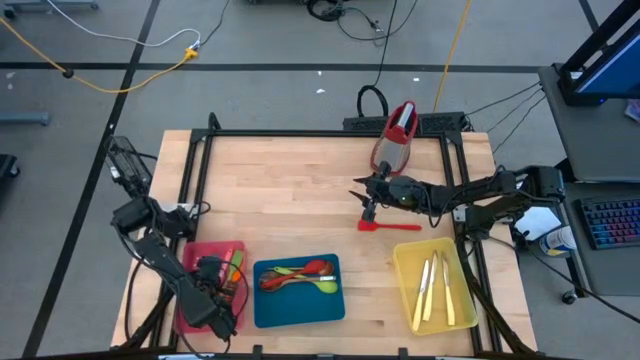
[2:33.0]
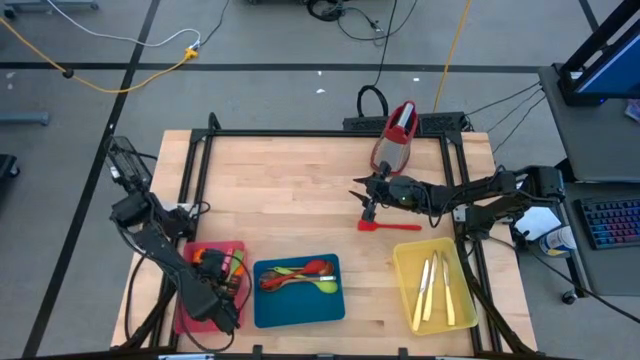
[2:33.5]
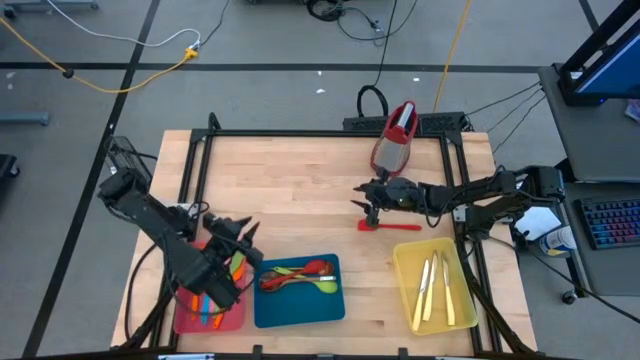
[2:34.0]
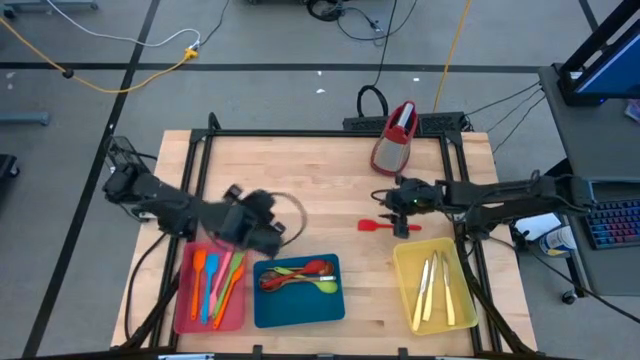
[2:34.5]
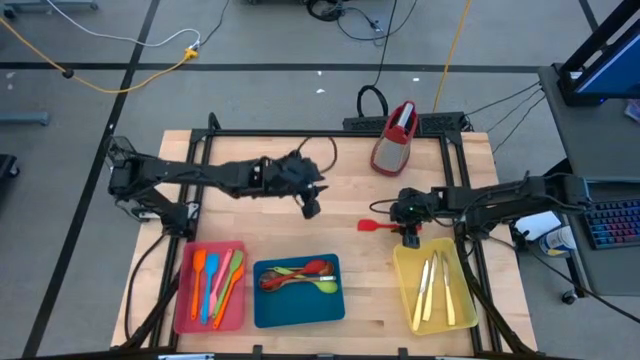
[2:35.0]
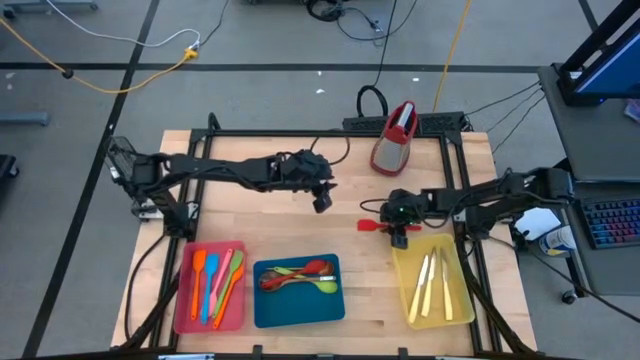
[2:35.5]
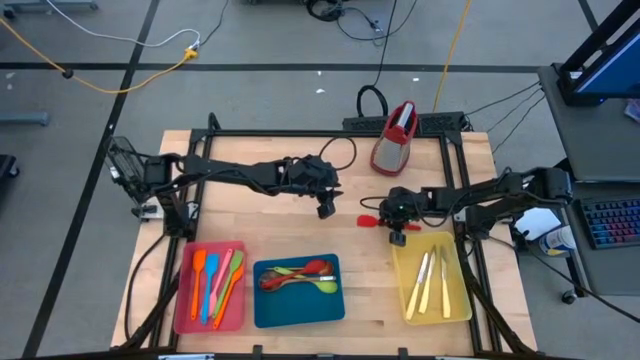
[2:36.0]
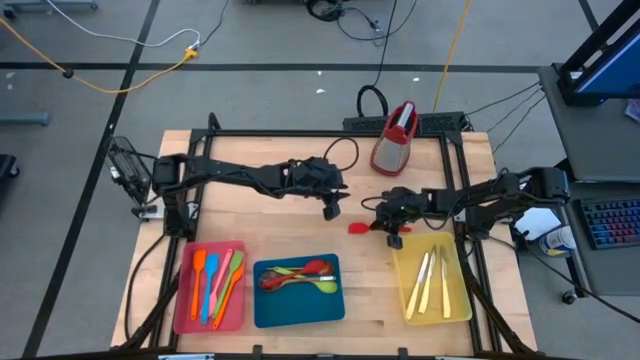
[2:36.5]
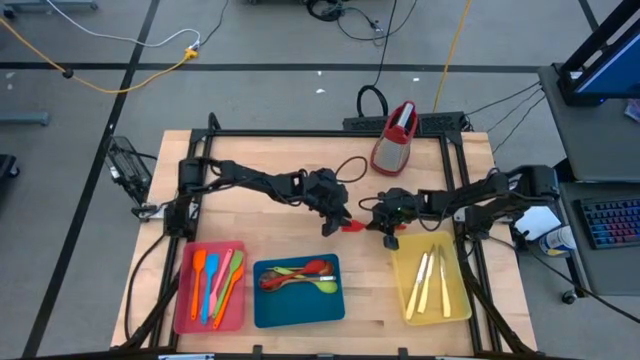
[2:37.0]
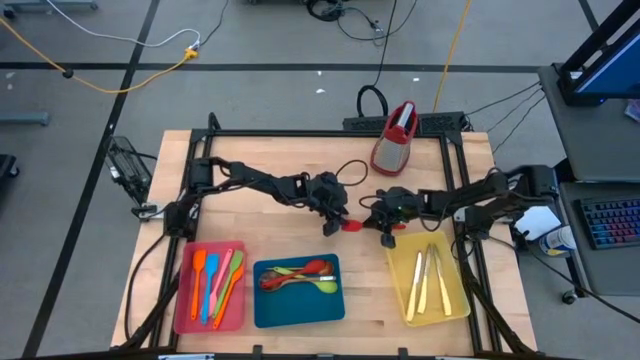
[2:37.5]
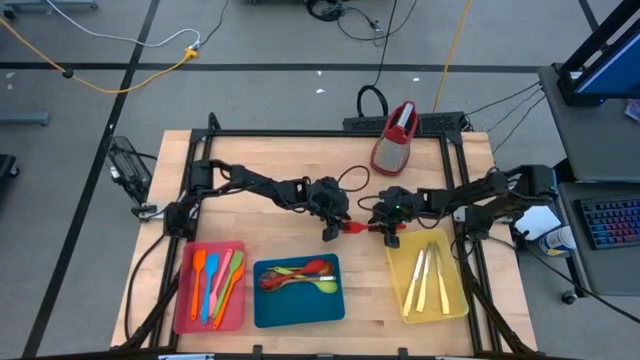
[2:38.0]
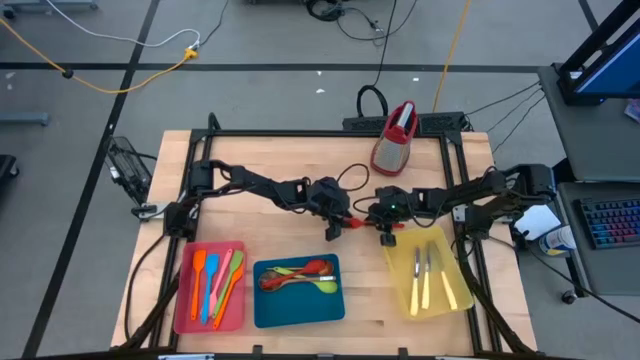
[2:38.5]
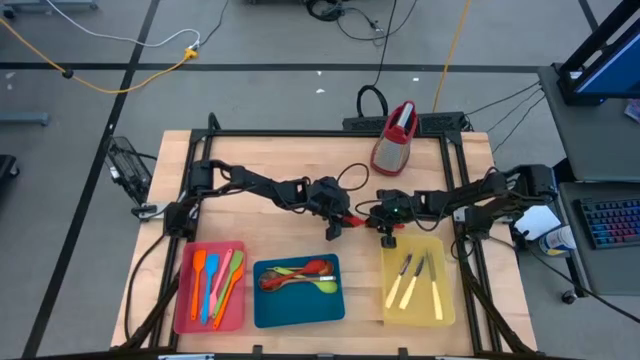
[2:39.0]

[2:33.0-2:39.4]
Task: Pick & Place Kitchen Items
Put the red spatula into the pink bin

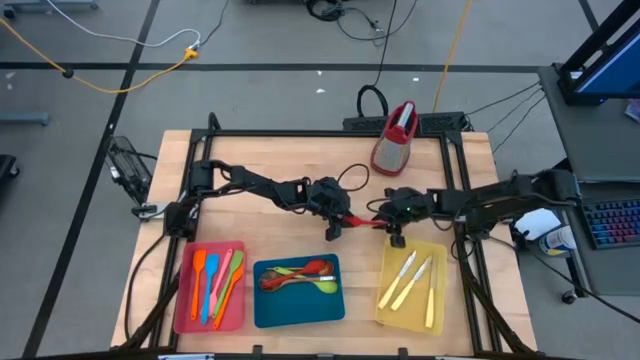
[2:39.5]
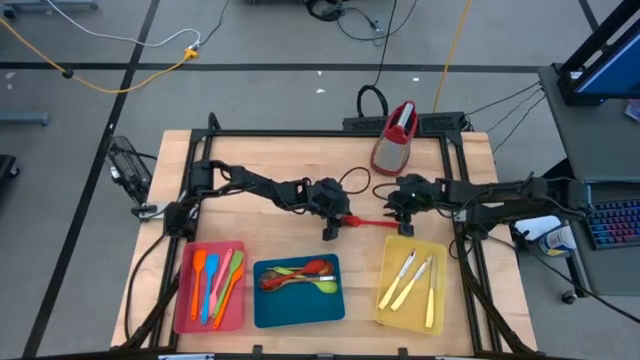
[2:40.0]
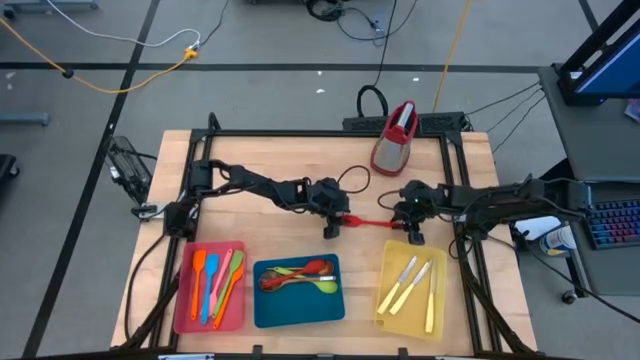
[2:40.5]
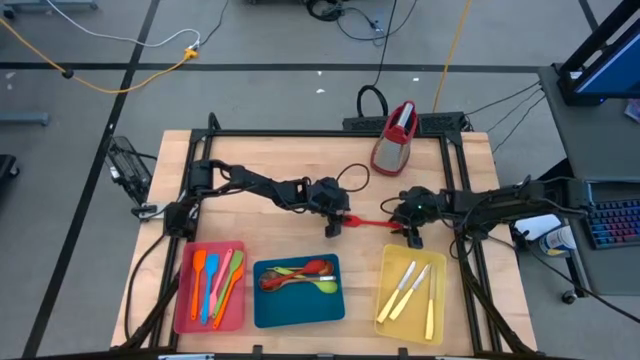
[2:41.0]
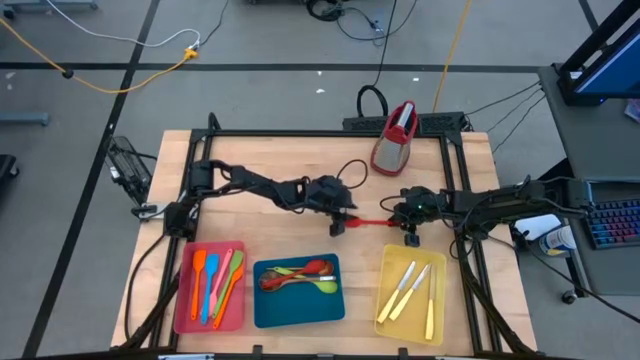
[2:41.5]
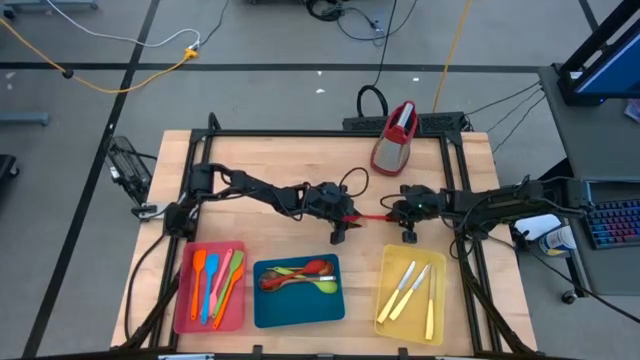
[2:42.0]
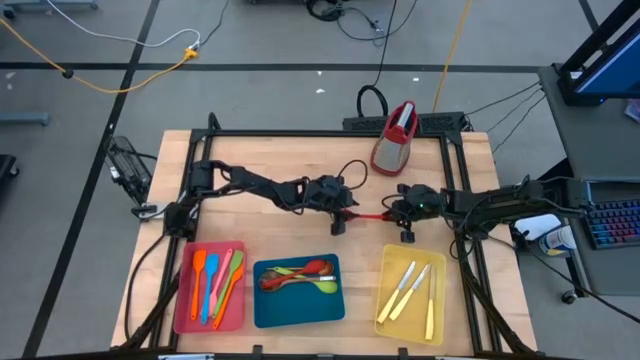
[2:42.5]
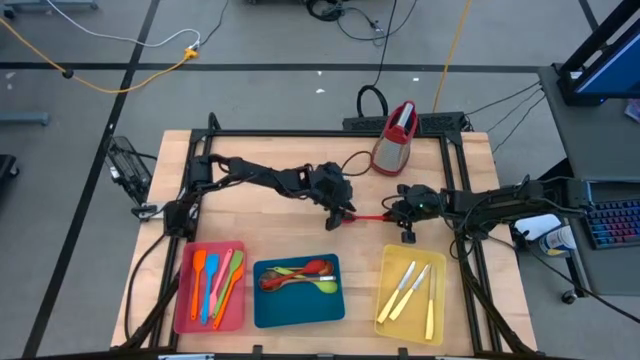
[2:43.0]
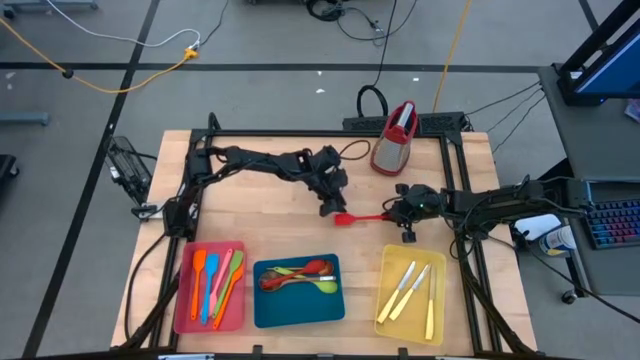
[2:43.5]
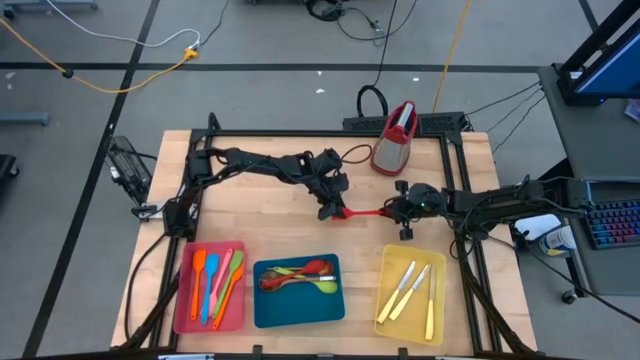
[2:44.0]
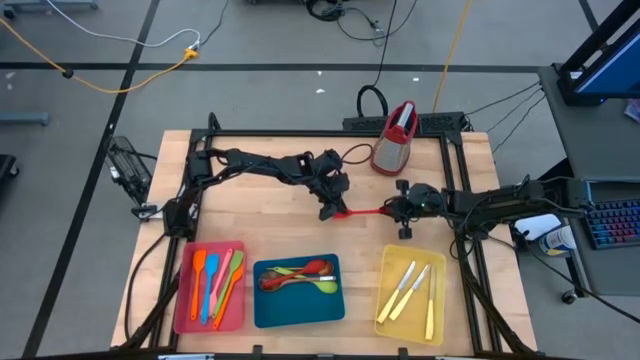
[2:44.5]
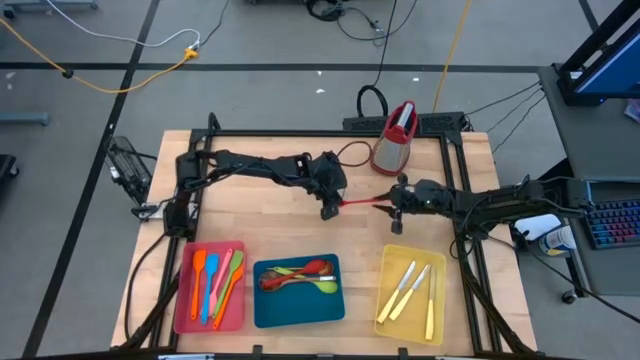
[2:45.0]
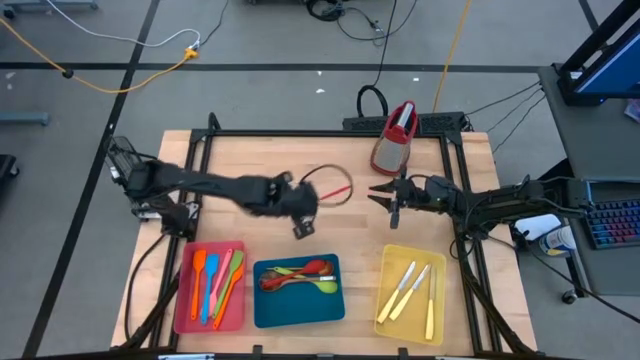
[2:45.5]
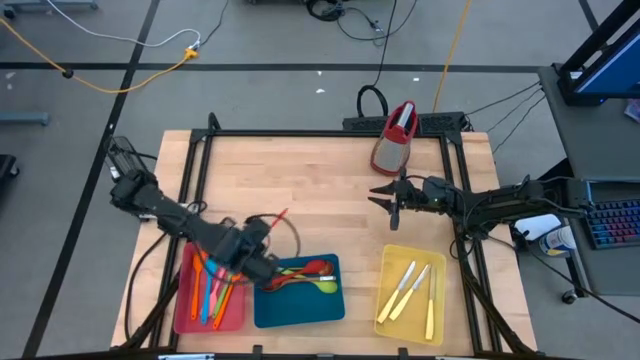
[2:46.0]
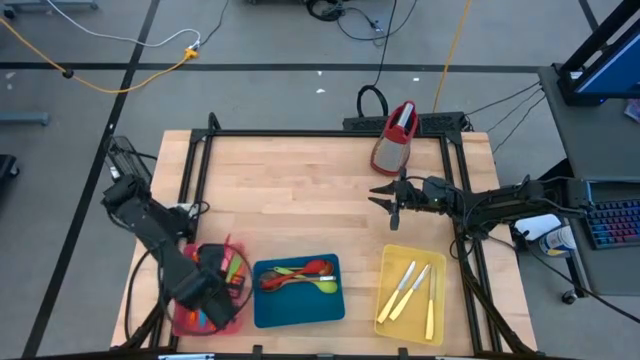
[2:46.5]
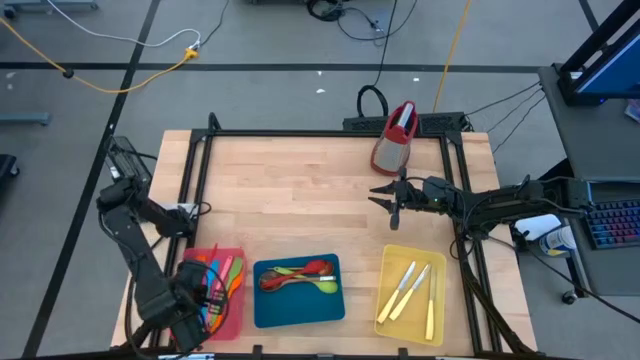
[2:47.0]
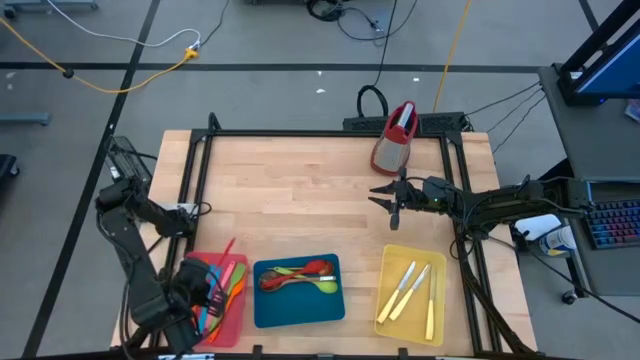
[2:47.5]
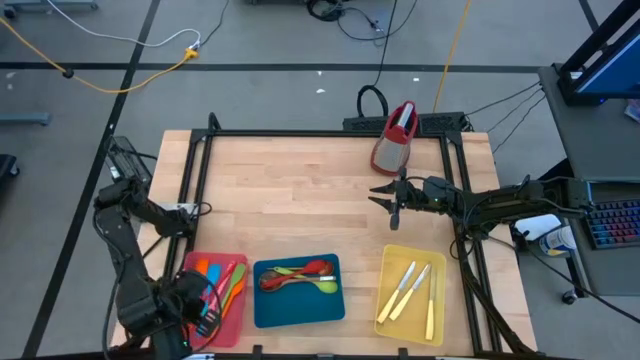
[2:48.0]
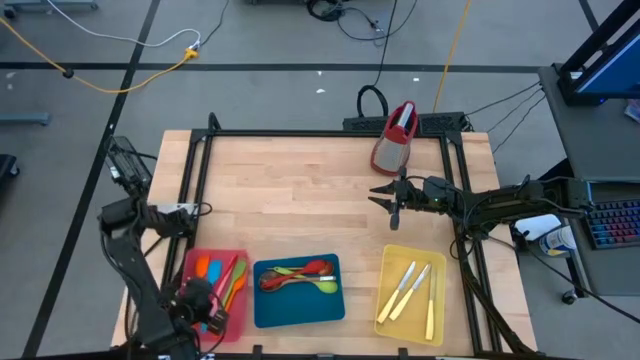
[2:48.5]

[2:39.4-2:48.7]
Put the red spatula into the pink bin

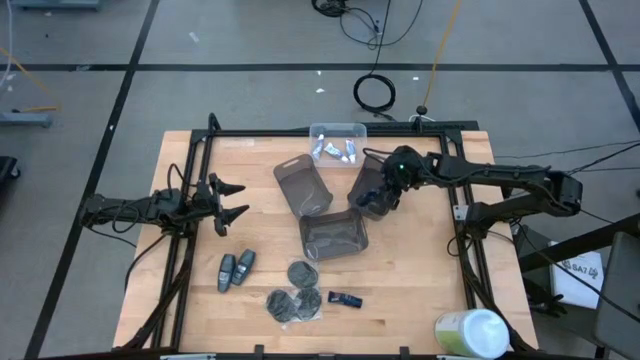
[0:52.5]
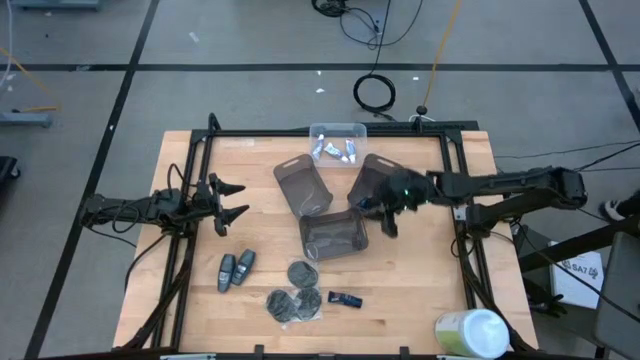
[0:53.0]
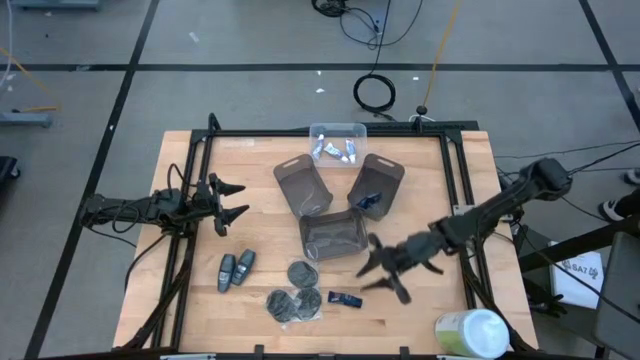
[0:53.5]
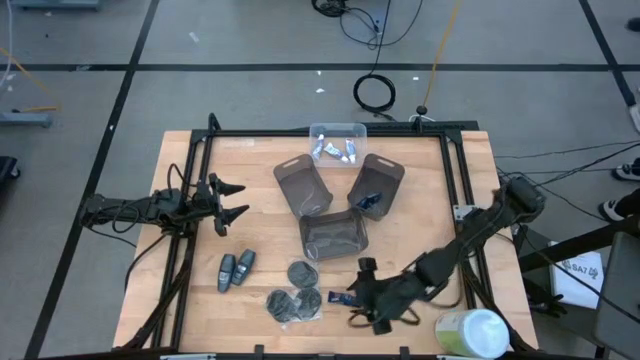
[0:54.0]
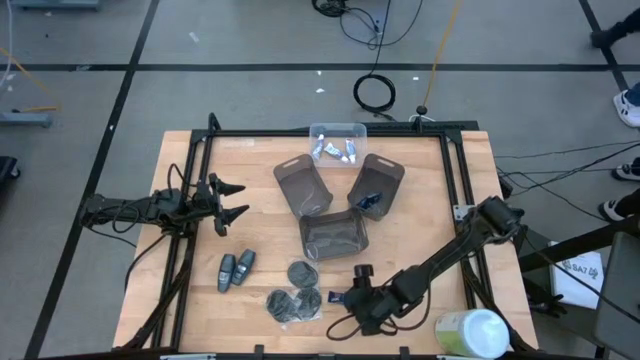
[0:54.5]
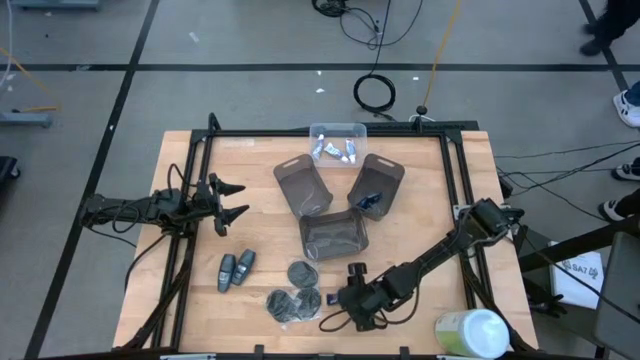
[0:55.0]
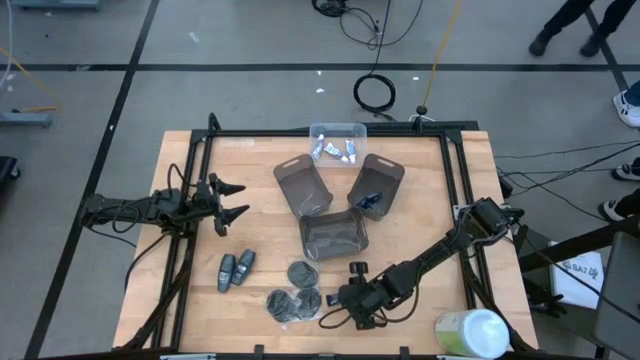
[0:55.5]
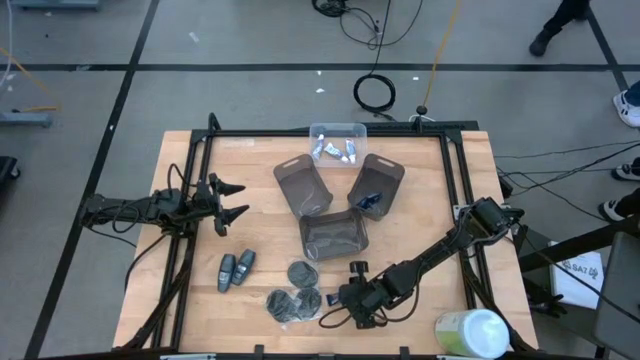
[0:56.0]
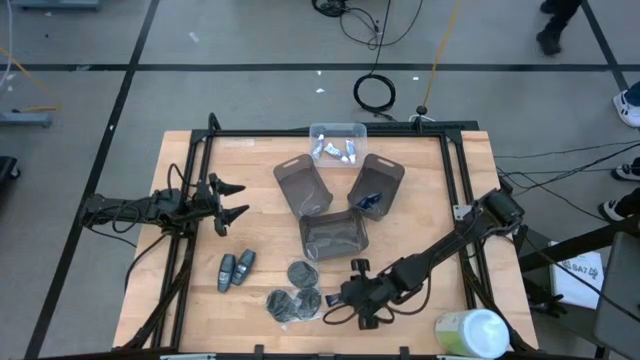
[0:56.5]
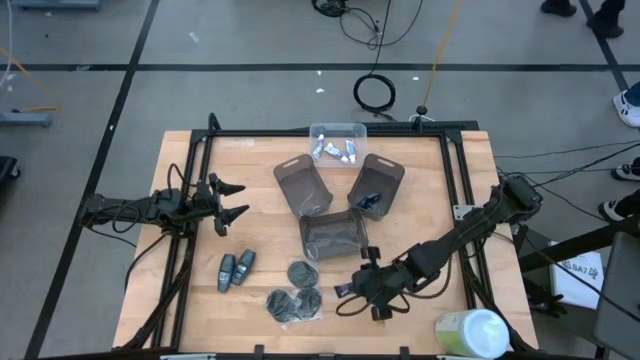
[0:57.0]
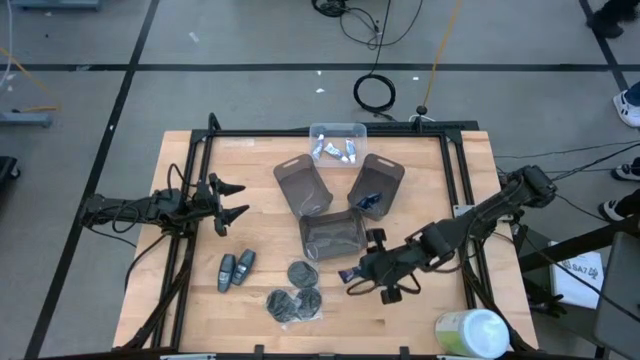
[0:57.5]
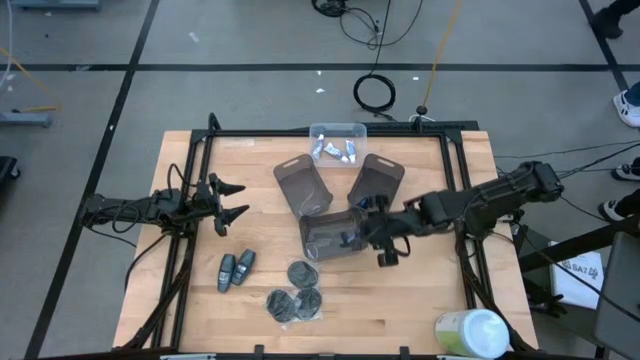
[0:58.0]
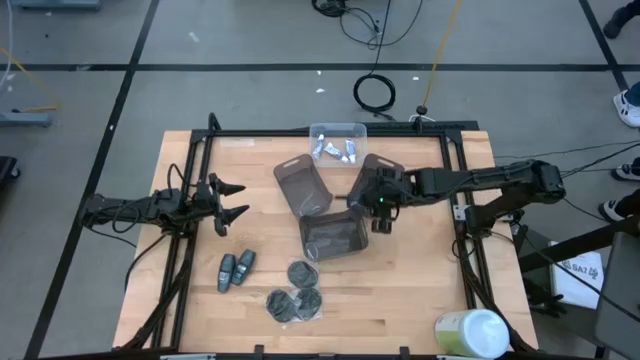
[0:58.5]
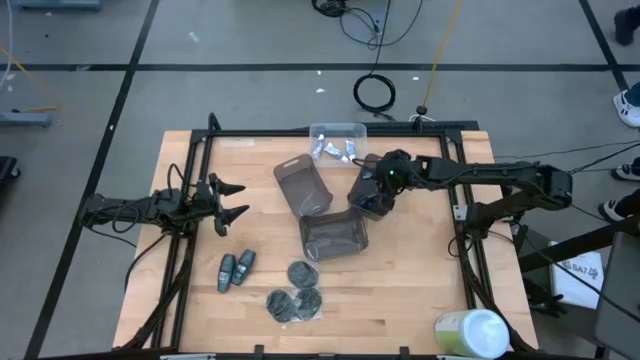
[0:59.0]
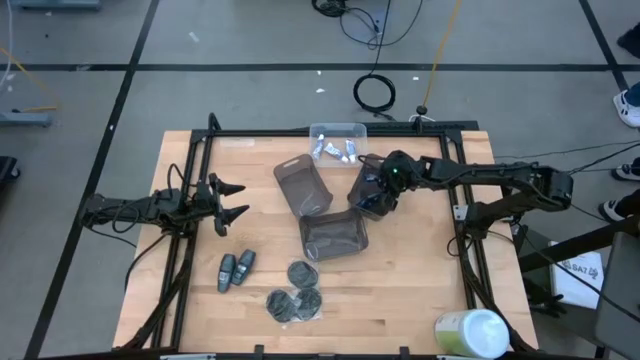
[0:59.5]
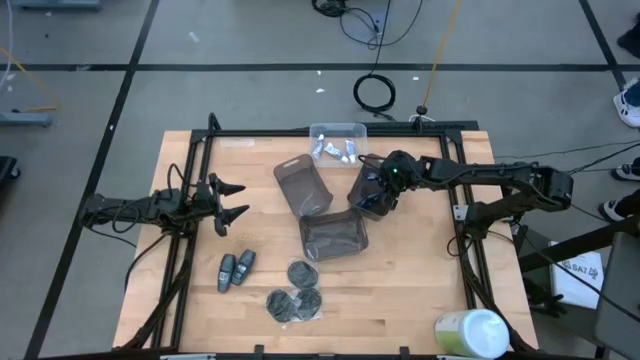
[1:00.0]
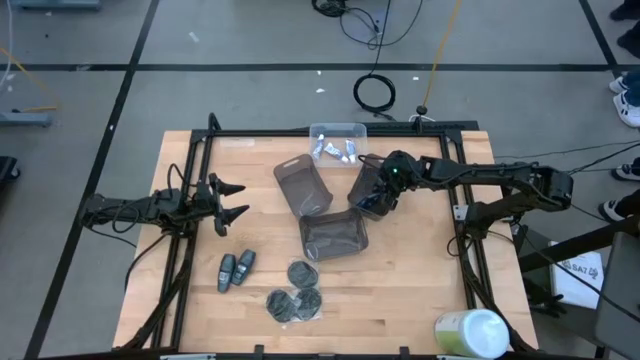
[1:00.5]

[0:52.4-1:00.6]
Task: Pick & Place Travel size toiletries
Put the black shave cream into the top right black transparent bin
